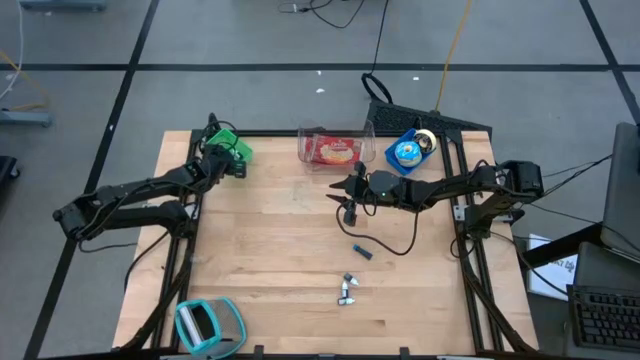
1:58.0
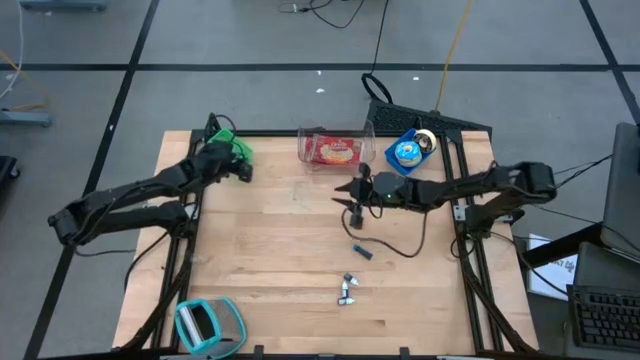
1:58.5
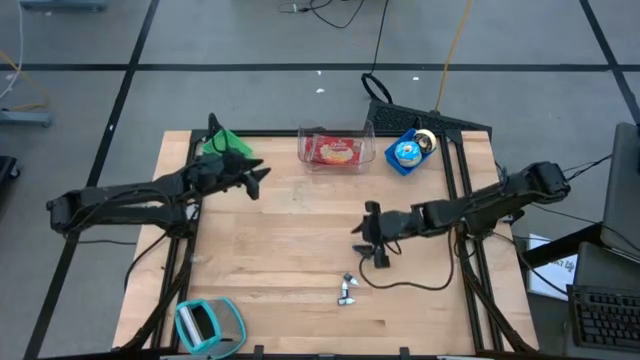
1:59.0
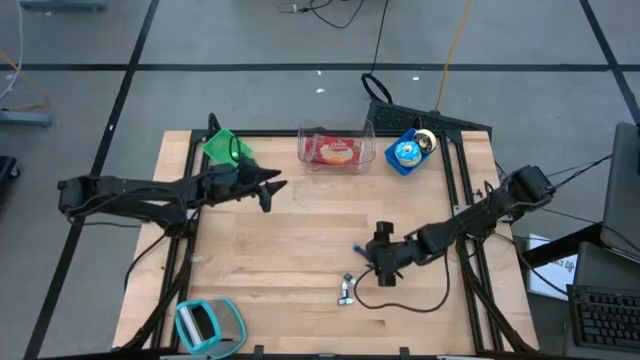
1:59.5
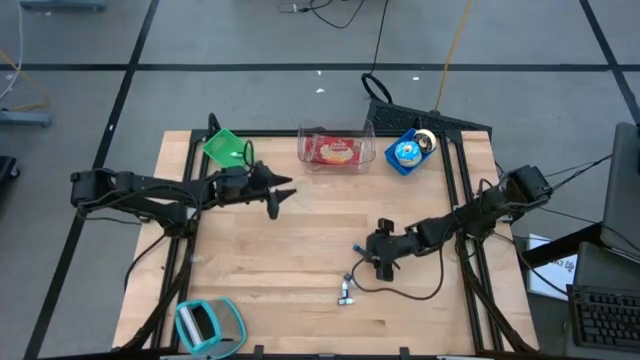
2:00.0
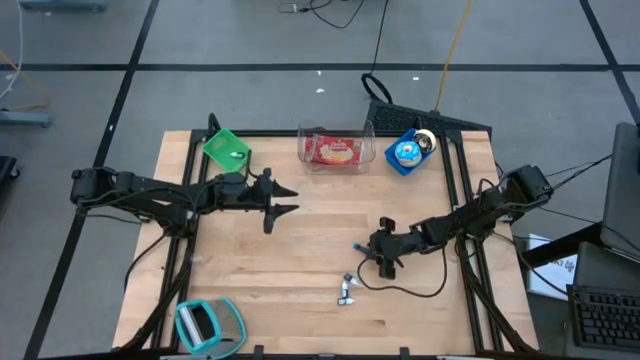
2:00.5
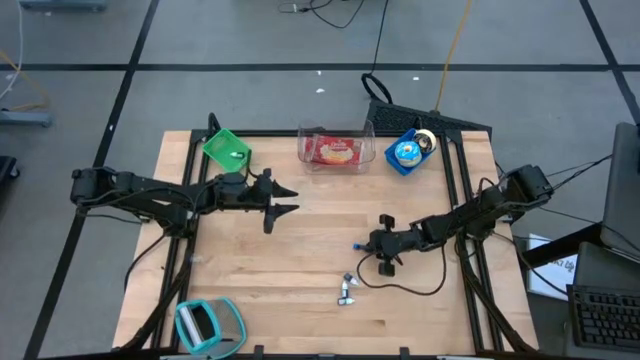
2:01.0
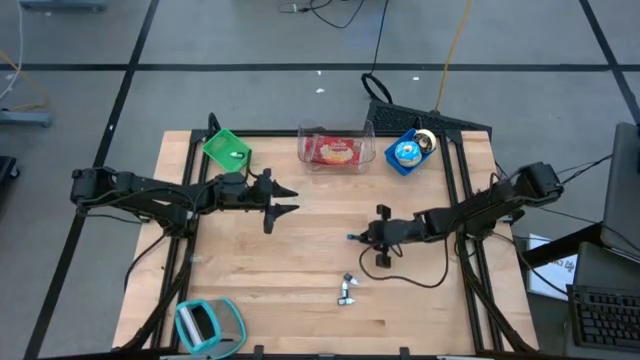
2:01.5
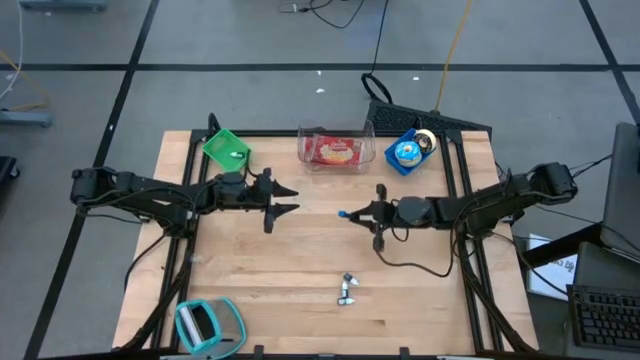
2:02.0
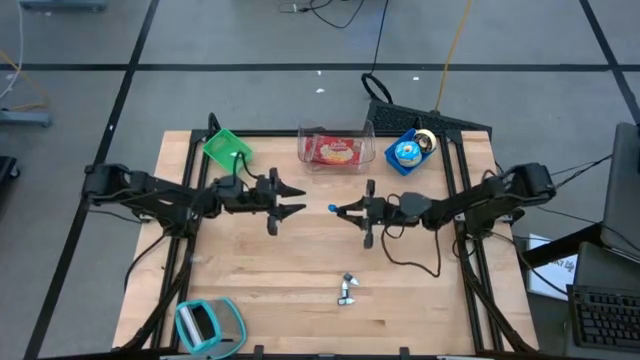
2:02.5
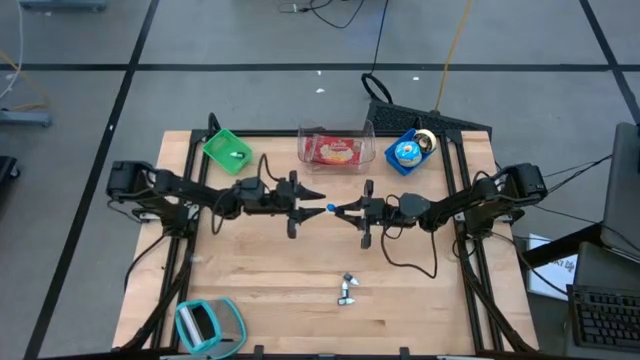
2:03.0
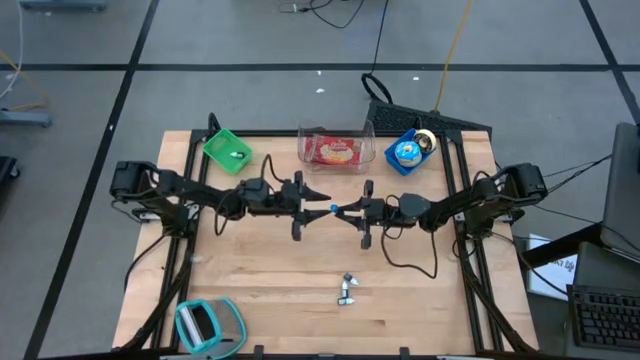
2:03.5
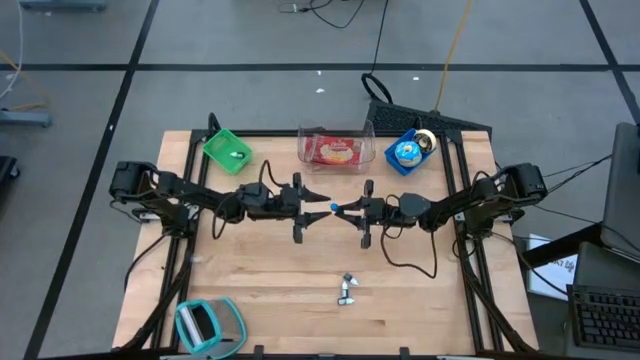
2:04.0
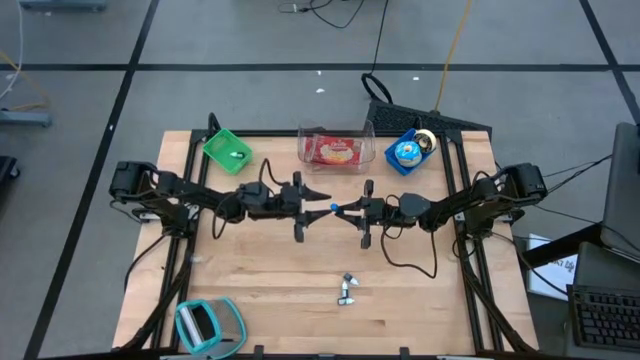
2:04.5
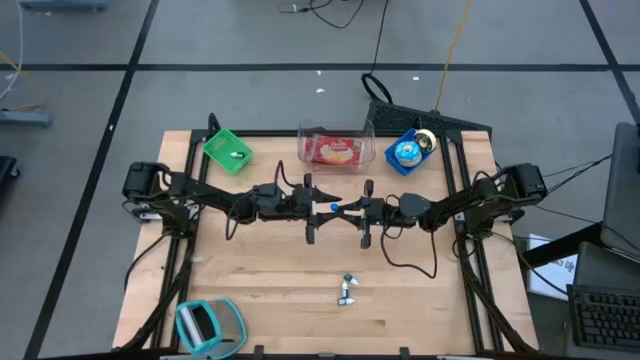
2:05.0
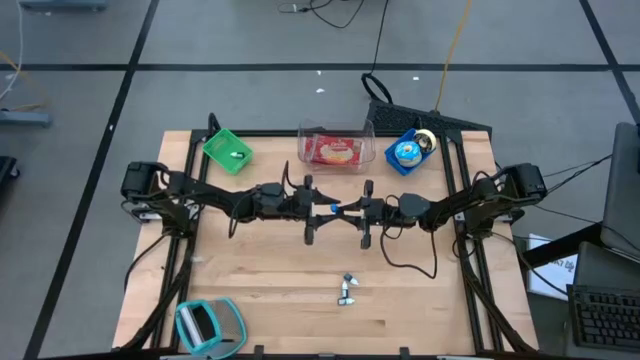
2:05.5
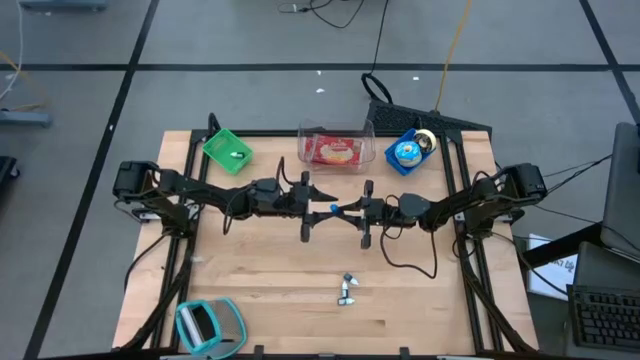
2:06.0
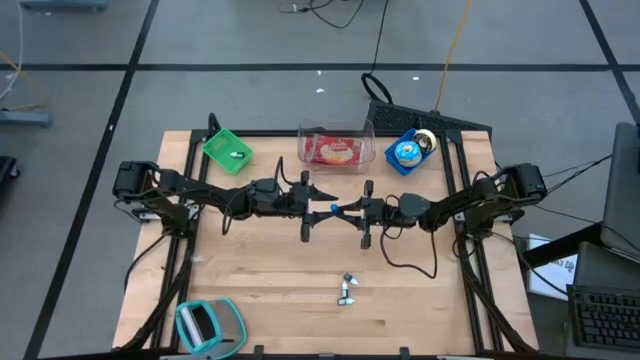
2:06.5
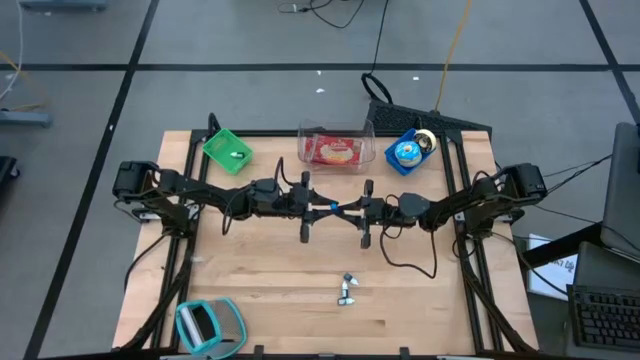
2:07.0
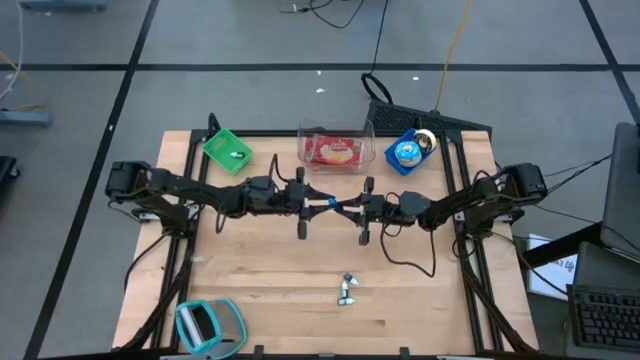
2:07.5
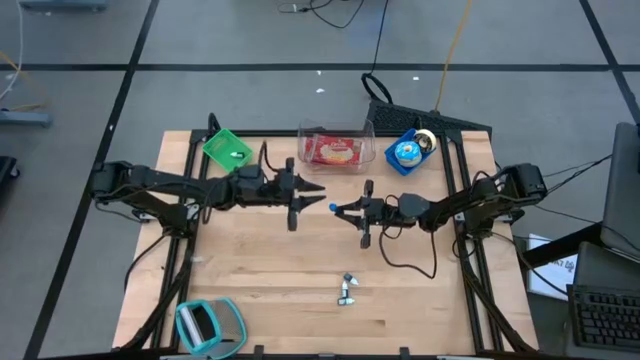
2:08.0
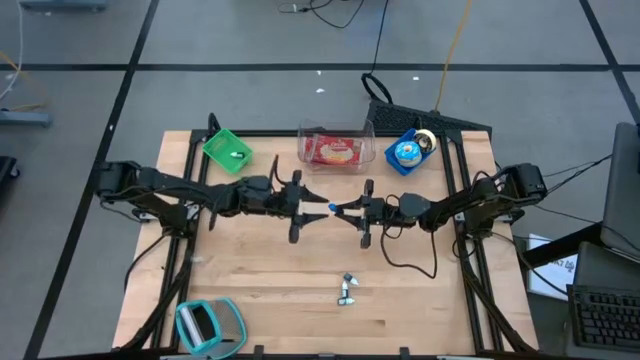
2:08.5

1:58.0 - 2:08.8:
Put the blue food coloring bottle into the green bin

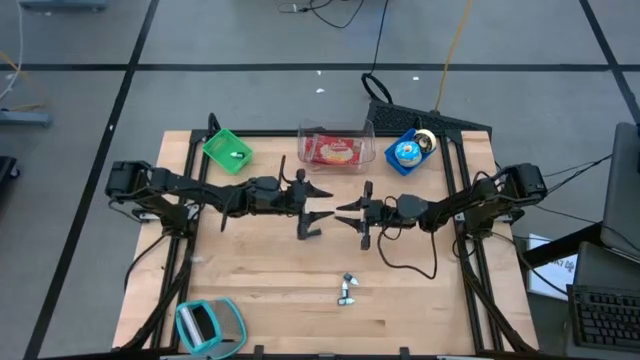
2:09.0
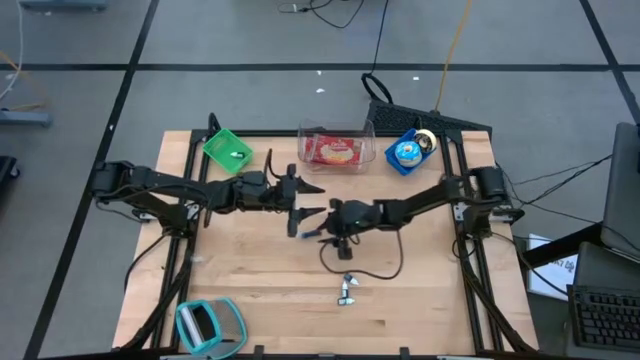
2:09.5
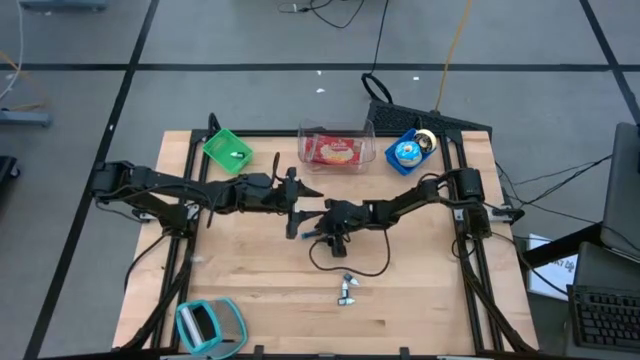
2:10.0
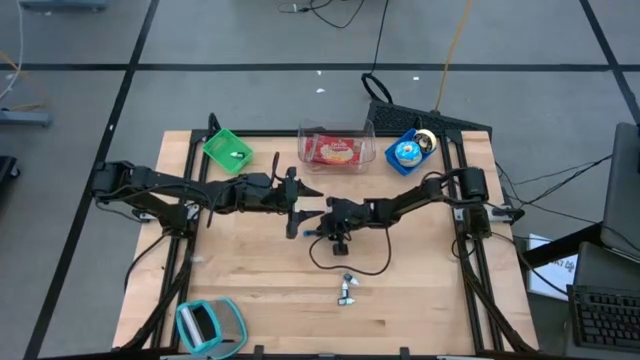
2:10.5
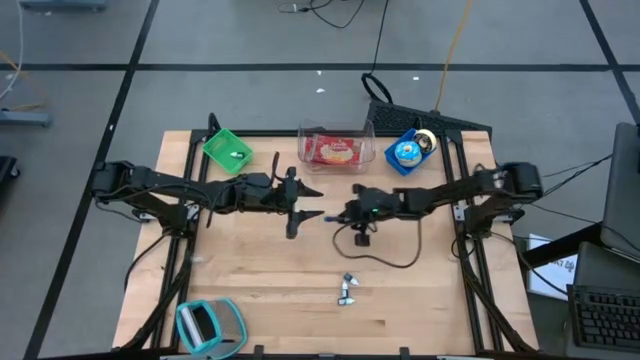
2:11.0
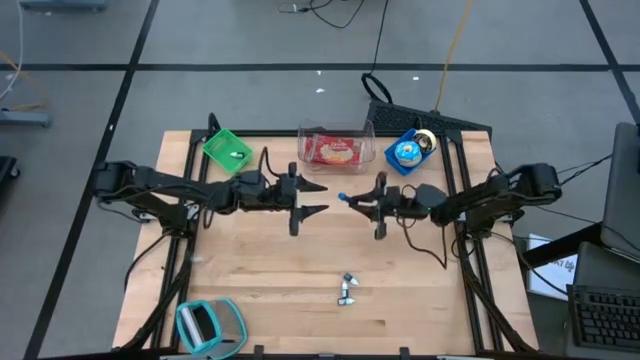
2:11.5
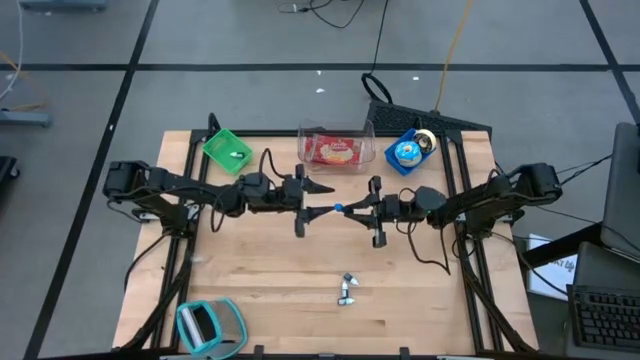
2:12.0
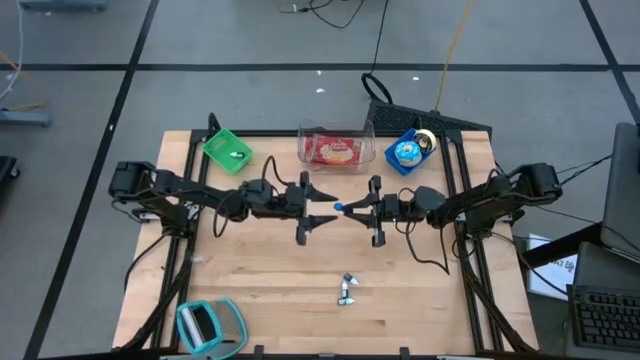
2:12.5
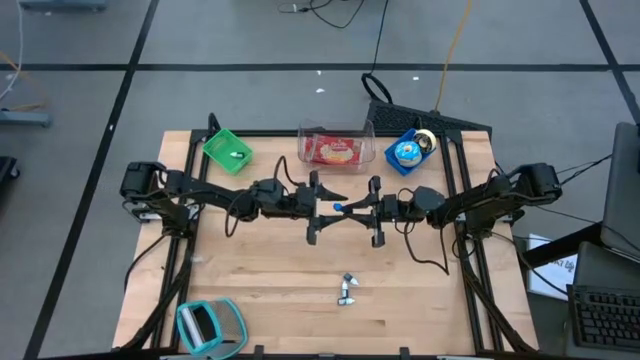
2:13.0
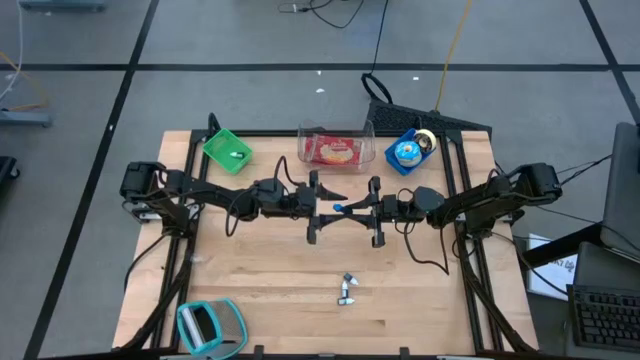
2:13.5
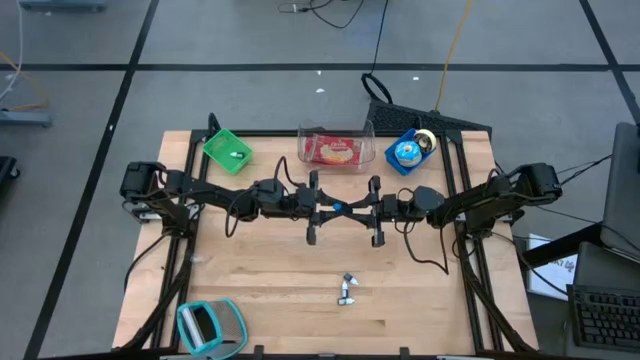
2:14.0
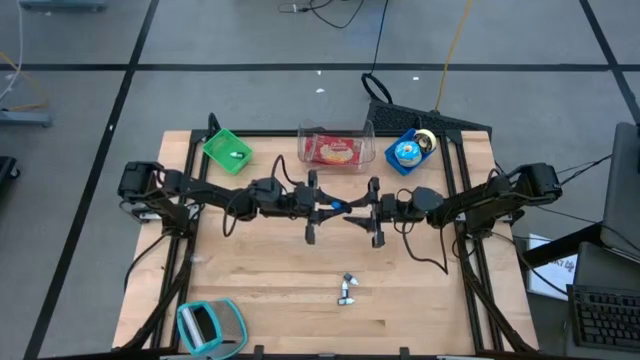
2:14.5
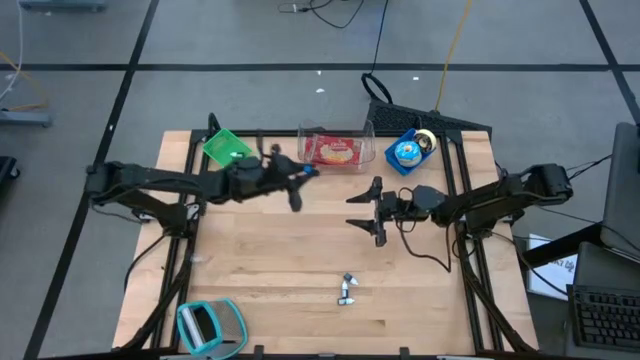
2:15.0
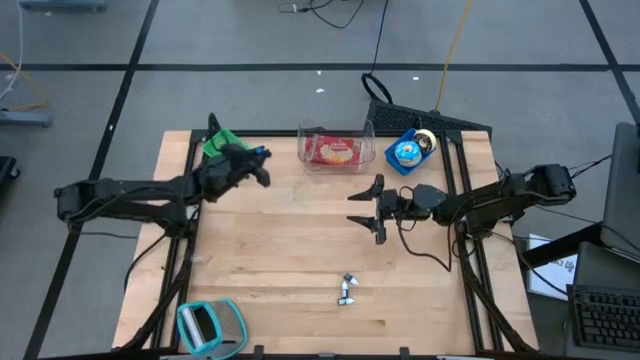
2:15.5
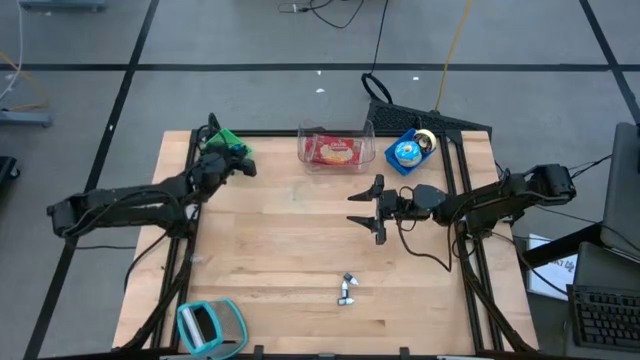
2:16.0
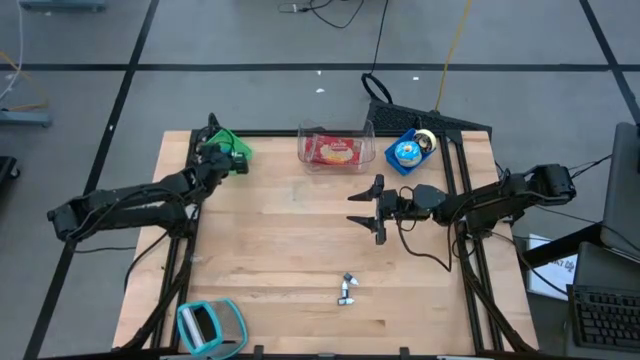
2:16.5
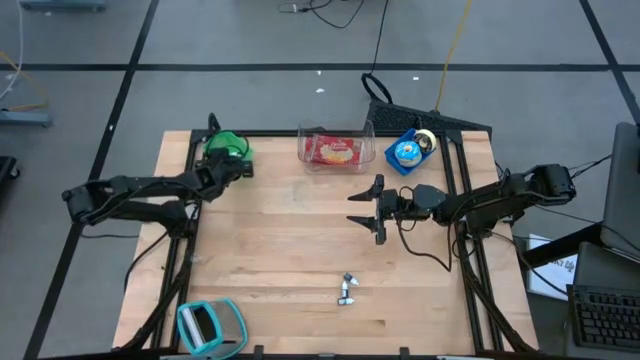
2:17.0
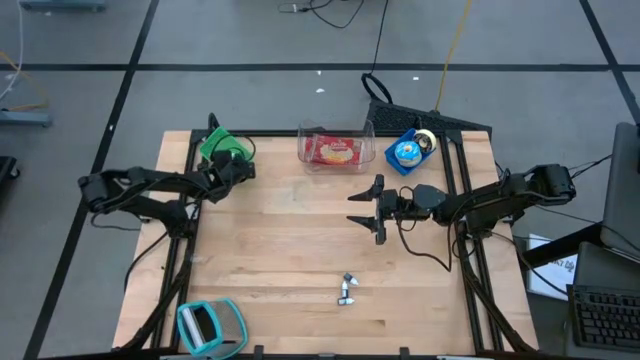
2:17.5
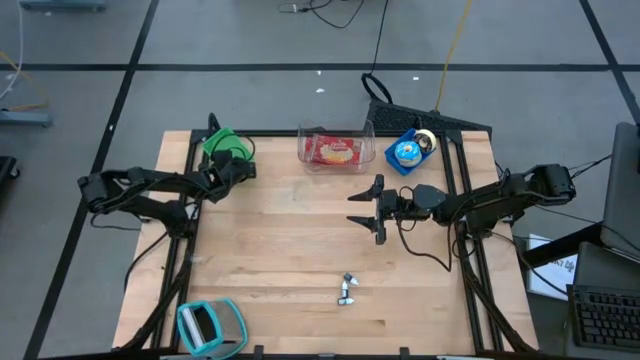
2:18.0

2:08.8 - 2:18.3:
Put the blue food coloring bottle into the green bin
